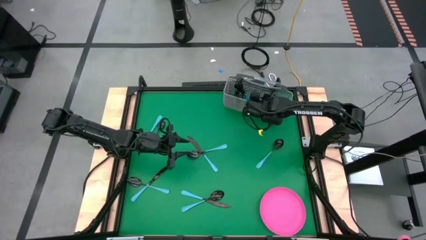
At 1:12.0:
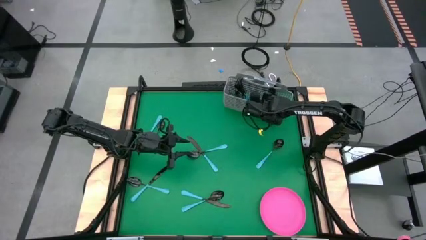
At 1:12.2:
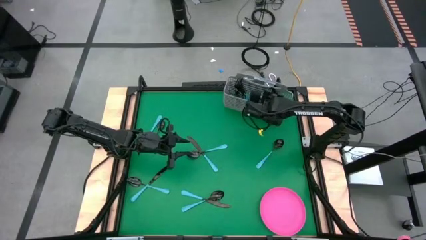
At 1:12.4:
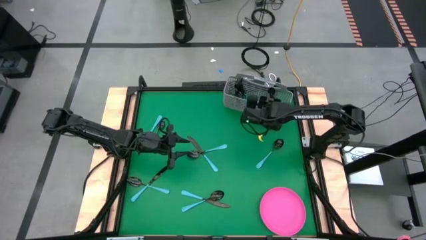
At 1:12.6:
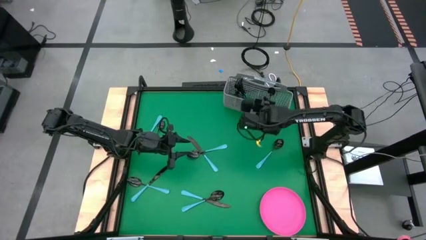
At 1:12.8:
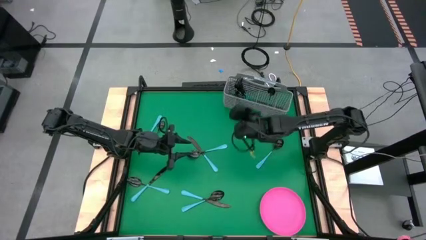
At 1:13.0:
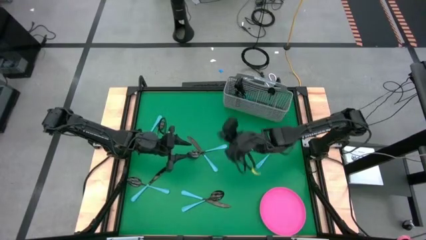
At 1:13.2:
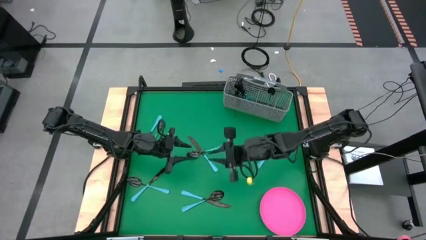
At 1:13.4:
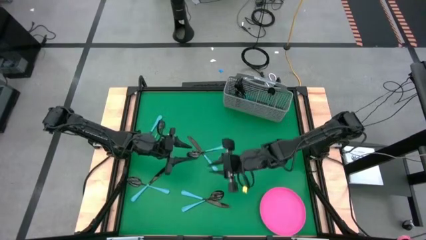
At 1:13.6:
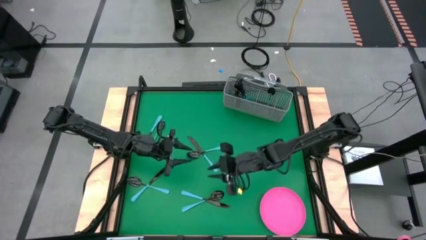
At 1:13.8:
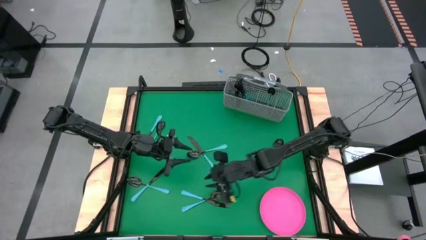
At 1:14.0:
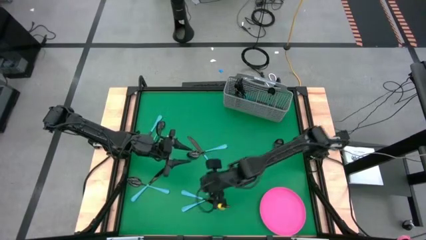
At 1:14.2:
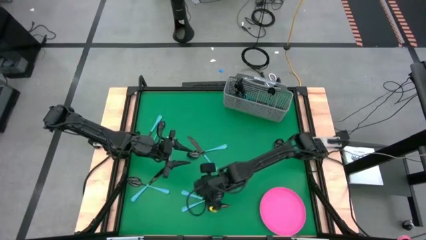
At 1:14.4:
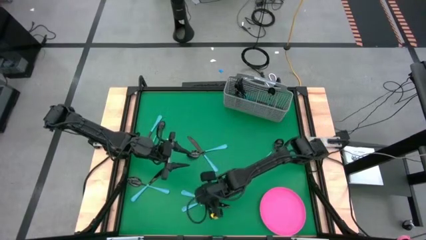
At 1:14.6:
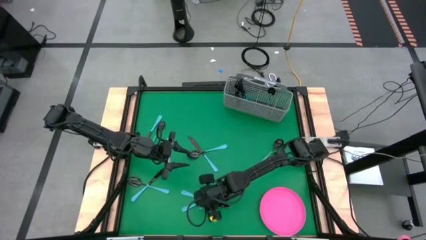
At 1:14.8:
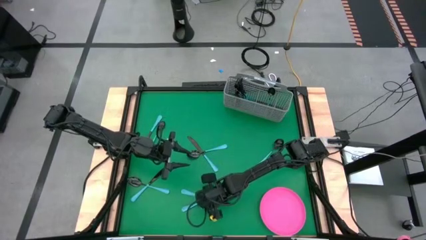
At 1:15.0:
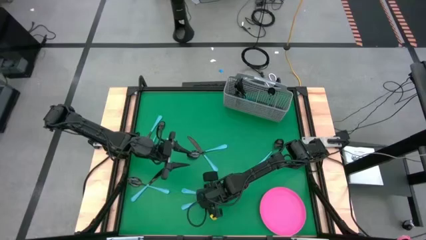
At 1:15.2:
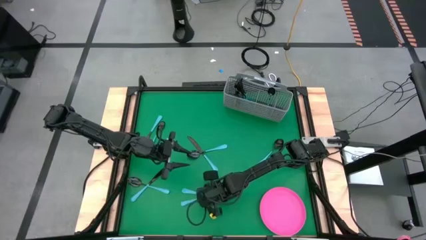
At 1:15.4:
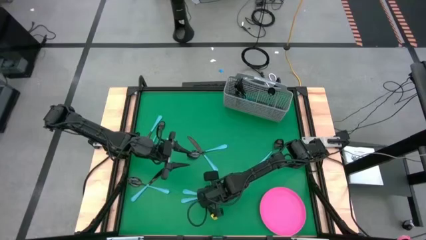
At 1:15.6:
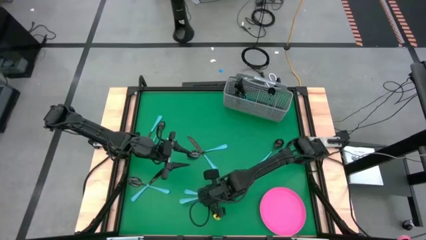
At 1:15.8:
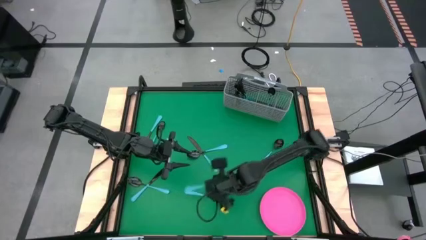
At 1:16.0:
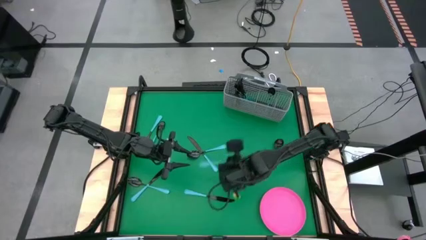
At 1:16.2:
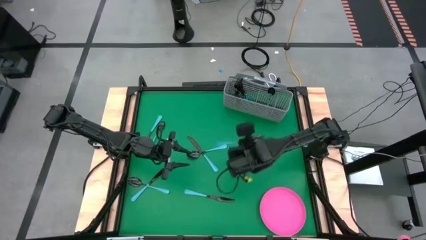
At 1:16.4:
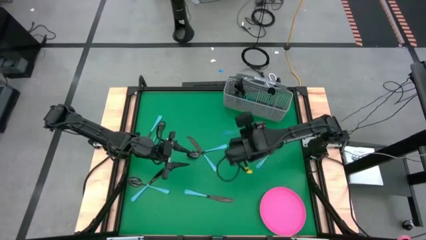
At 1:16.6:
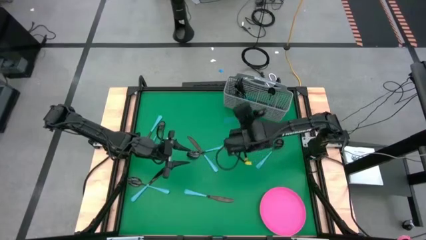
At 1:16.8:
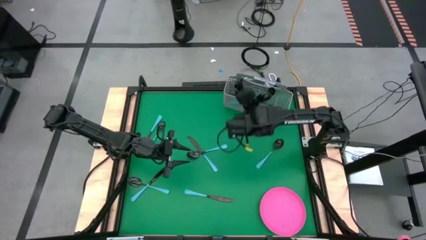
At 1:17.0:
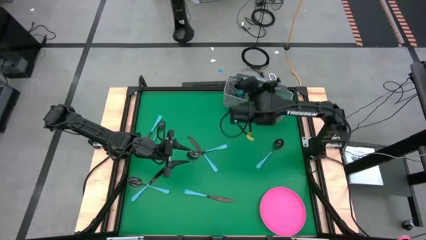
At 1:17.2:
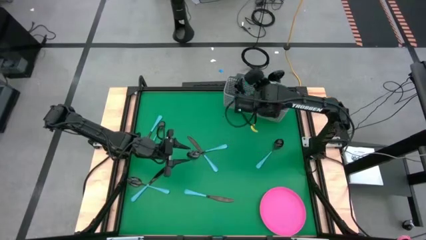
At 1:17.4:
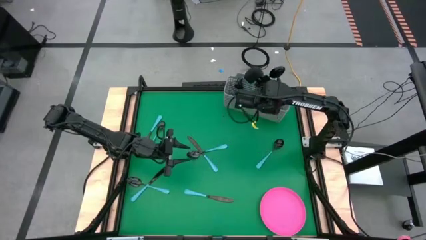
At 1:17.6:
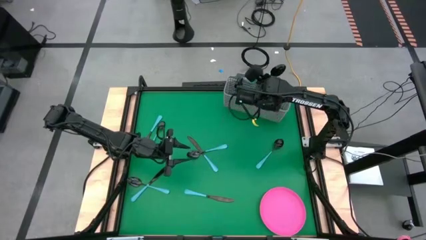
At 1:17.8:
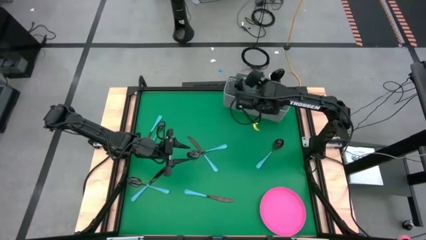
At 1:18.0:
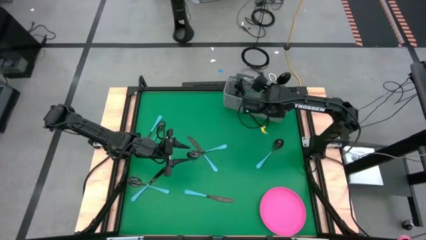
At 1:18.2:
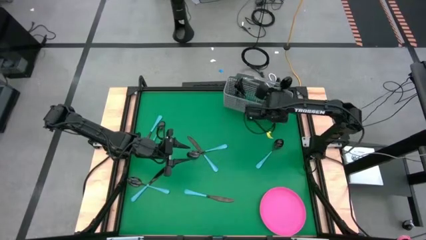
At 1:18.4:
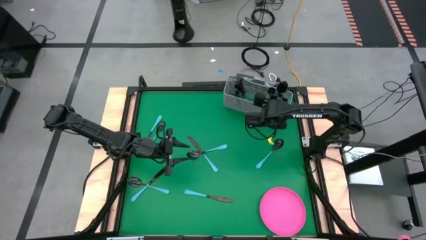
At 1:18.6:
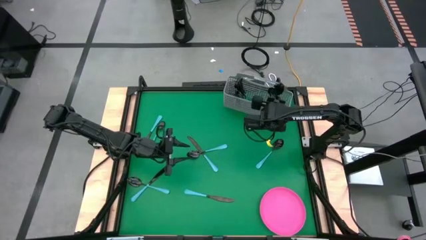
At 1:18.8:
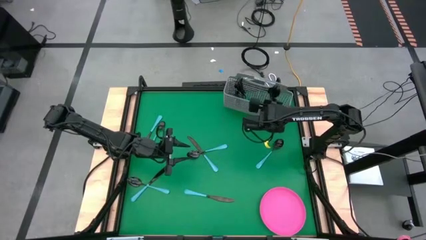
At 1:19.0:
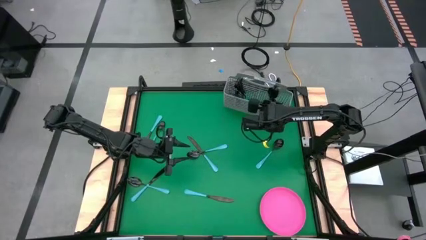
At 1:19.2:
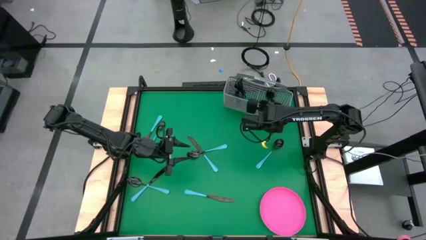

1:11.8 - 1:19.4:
Task: Sort silverware
Put the blue spoon into the silverware basket

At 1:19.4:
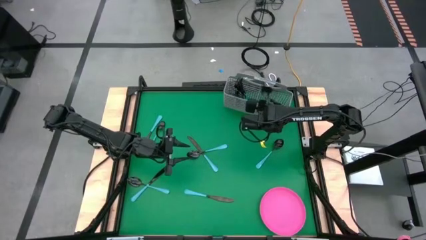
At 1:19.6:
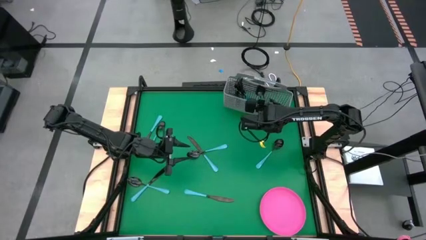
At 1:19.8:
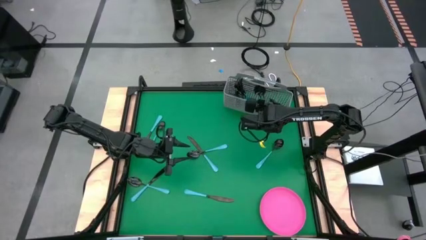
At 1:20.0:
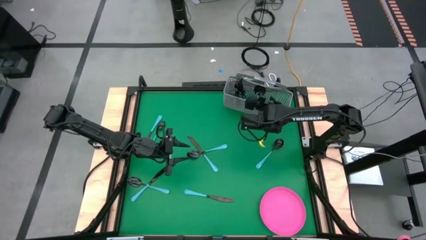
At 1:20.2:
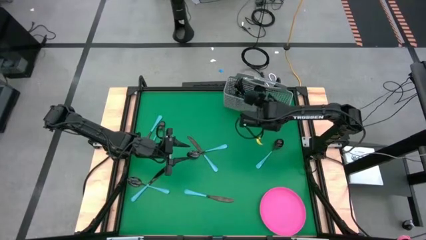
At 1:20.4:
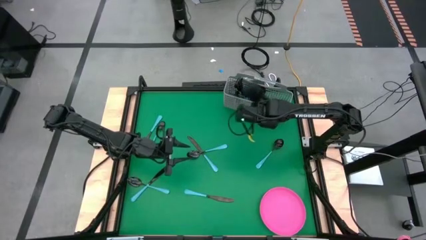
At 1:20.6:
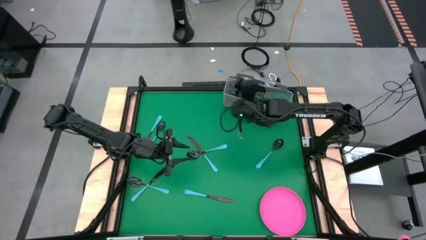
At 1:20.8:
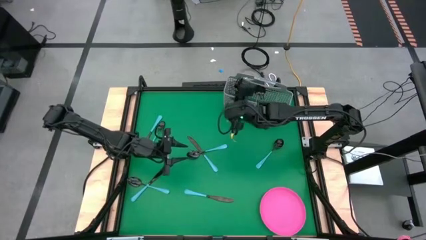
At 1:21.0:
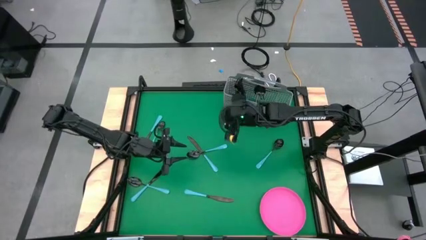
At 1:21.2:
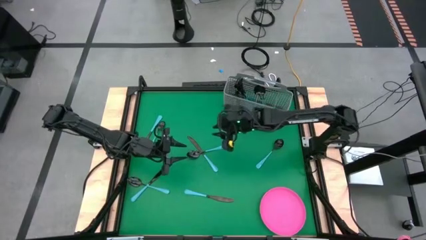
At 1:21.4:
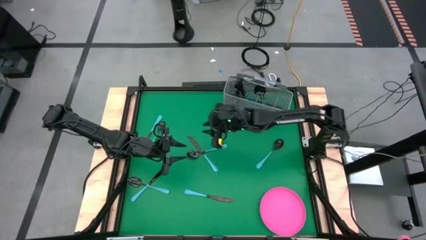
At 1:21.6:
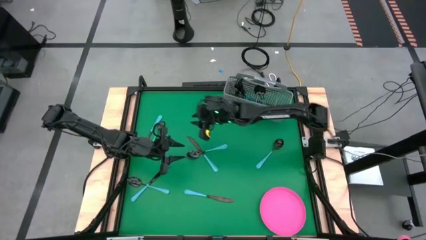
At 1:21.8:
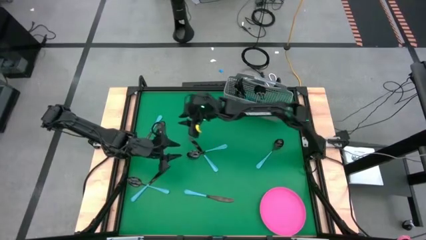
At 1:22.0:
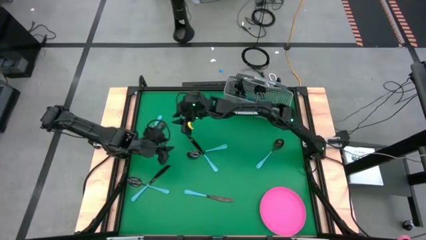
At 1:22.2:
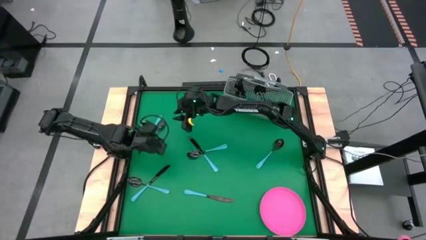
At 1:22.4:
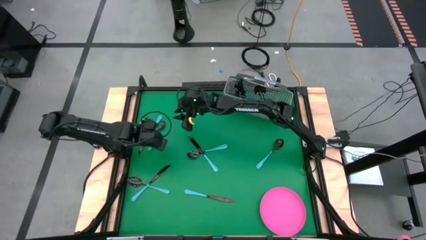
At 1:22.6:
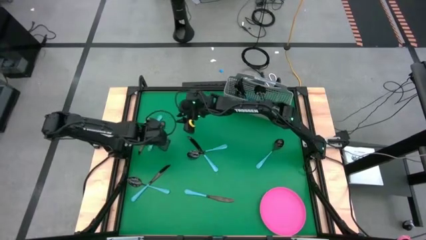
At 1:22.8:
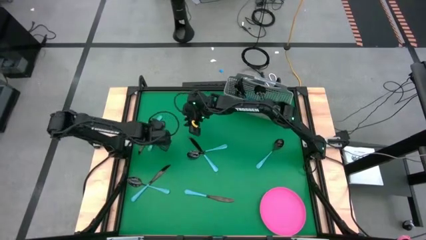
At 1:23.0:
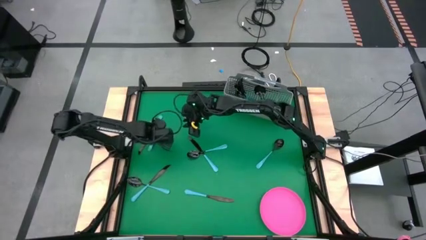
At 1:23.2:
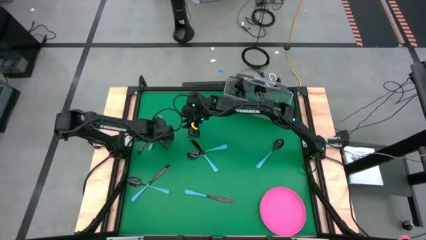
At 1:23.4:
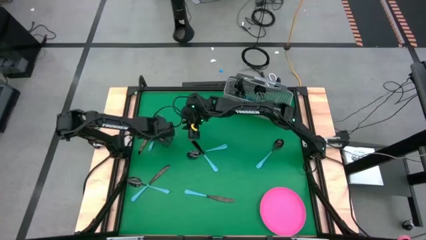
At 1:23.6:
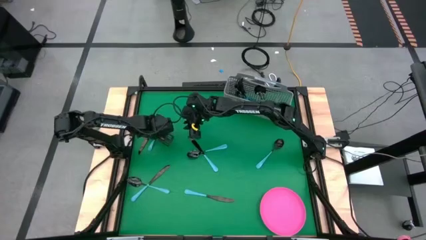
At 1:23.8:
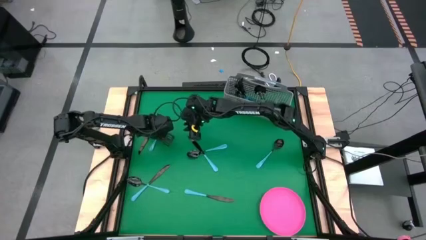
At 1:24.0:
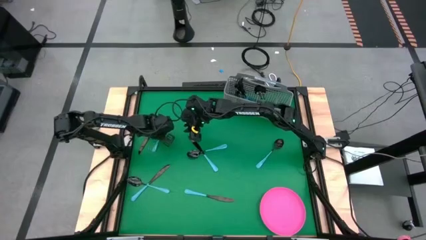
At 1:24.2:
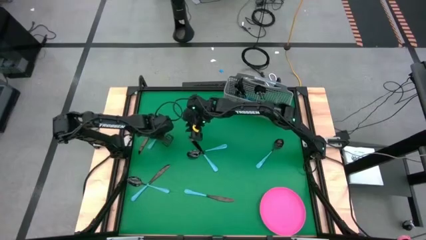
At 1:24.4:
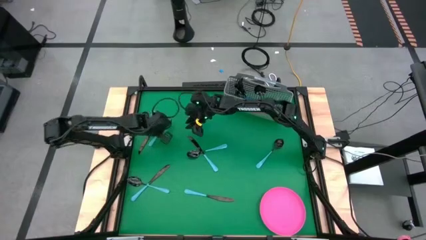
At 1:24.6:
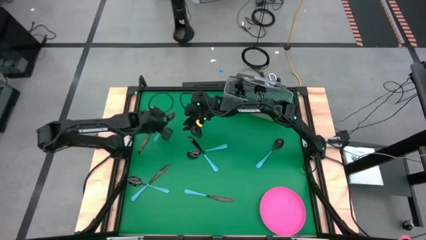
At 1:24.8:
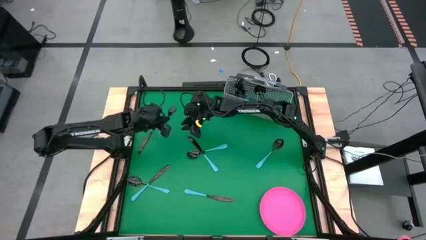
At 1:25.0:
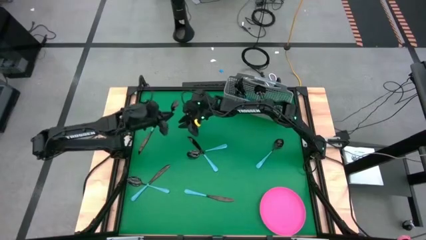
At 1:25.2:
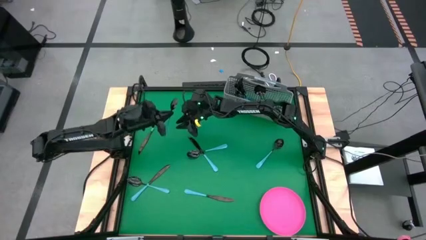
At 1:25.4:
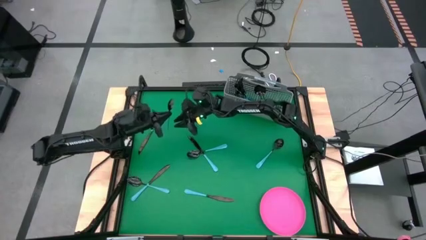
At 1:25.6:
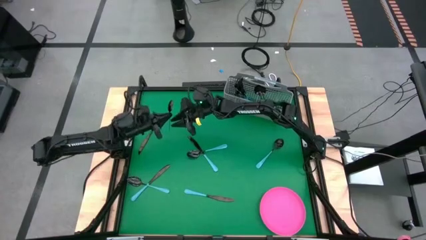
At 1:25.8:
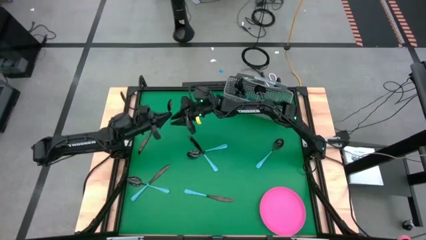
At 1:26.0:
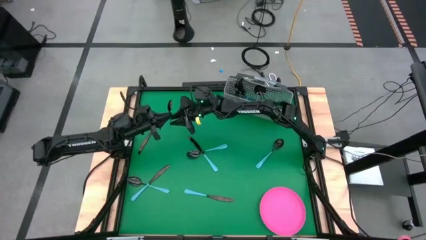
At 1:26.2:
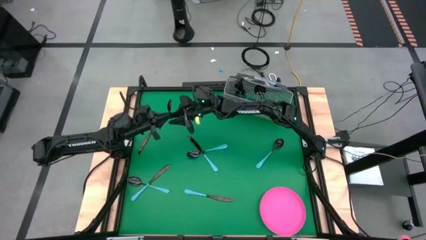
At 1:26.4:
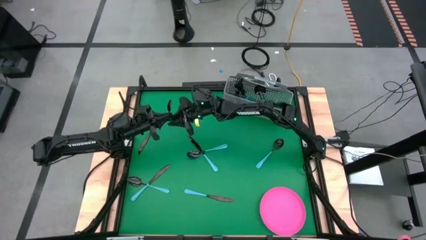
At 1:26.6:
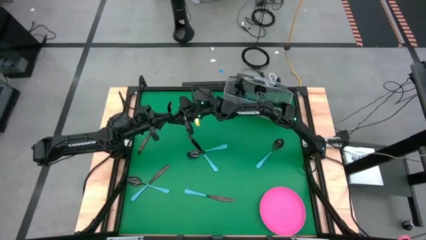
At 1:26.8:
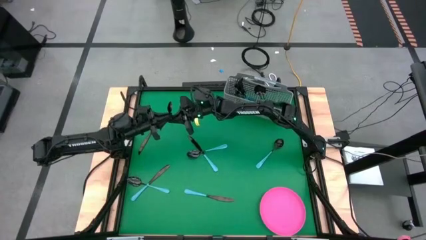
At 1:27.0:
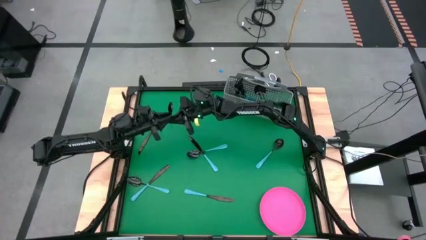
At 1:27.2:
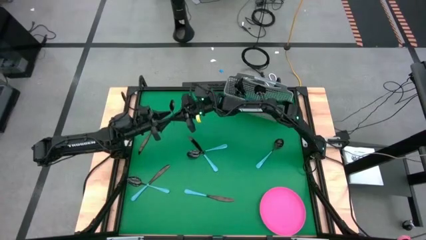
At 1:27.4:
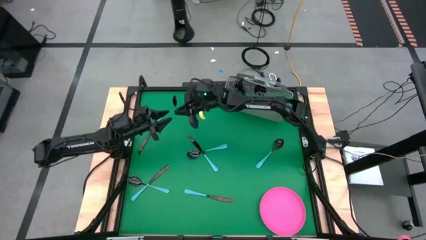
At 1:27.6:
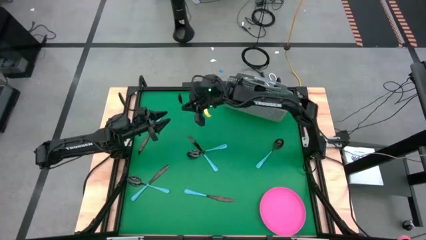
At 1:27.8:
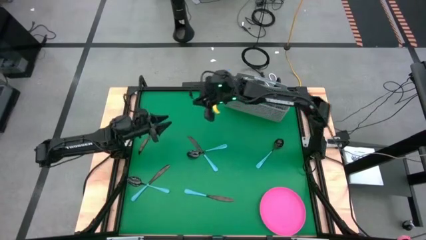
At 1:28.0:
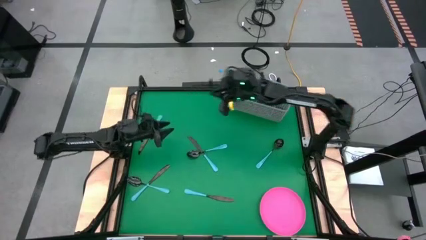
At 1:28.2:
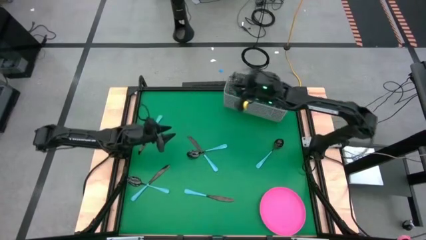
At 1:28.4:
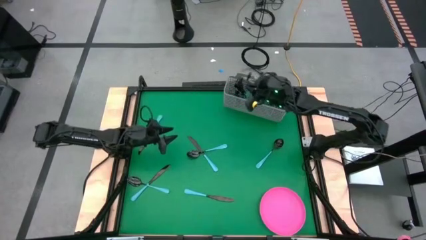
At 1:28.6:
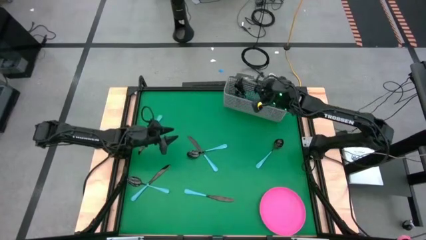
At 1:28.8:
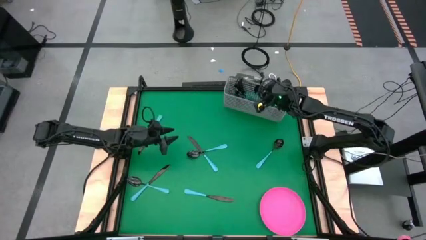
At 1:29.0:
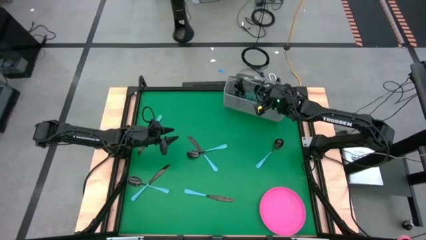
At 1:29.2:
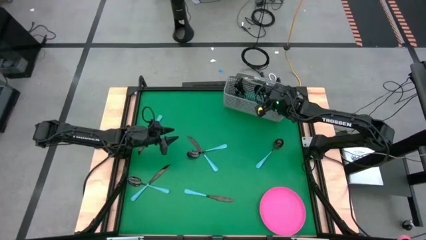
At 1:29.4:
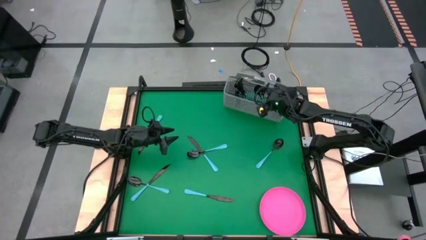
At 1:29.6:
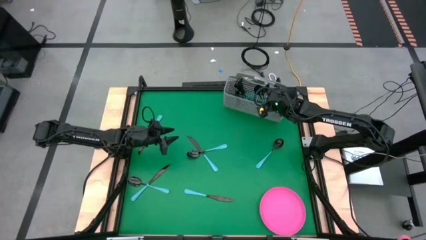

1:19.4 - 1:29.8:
Put the blue spoon into the silverware basket
